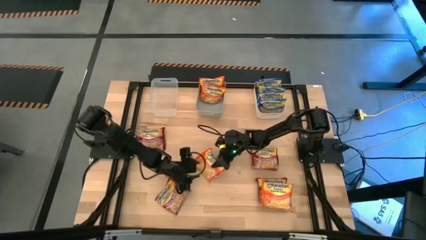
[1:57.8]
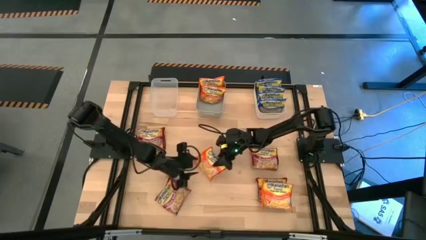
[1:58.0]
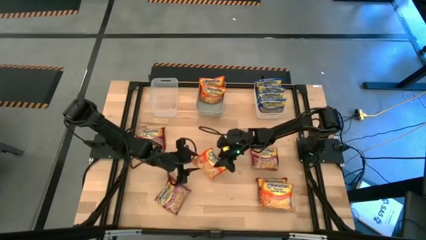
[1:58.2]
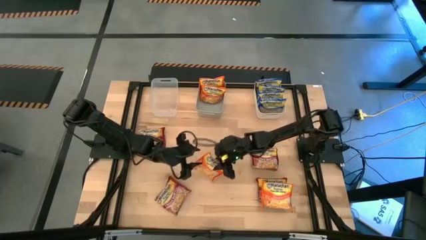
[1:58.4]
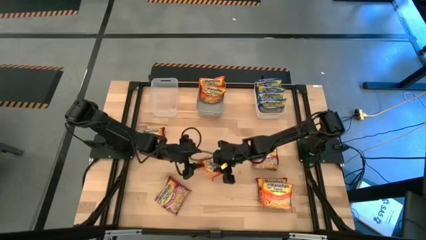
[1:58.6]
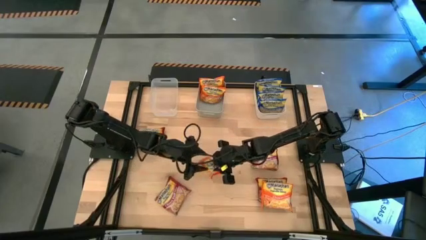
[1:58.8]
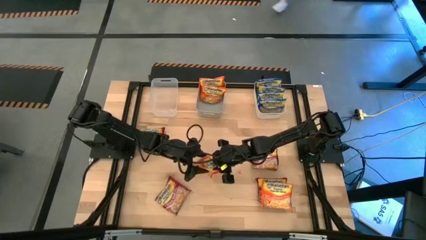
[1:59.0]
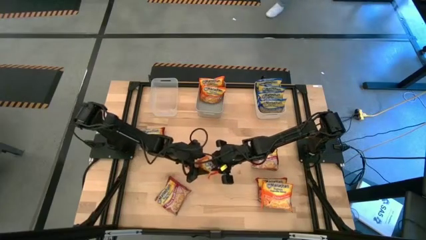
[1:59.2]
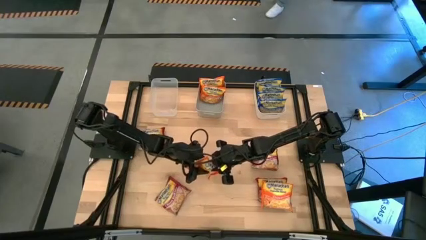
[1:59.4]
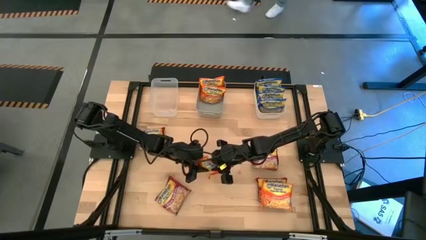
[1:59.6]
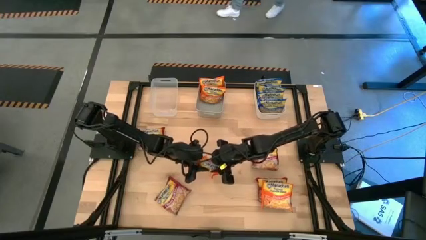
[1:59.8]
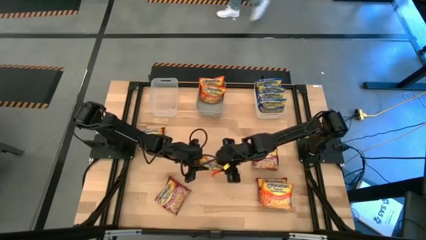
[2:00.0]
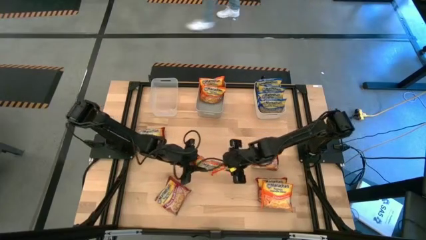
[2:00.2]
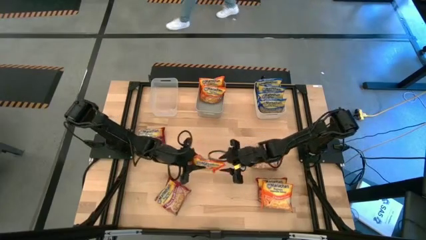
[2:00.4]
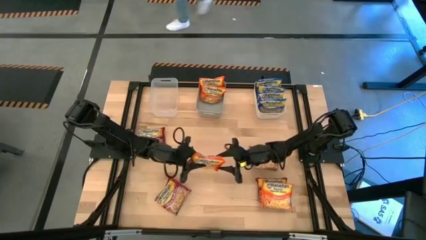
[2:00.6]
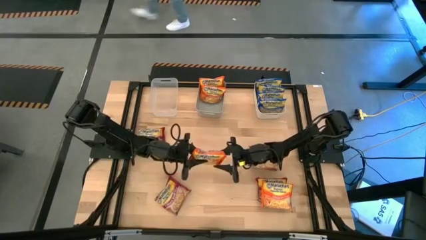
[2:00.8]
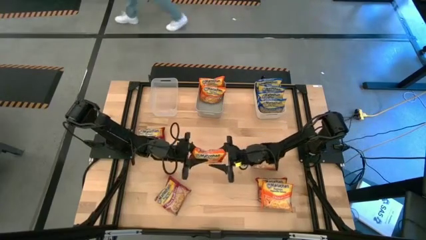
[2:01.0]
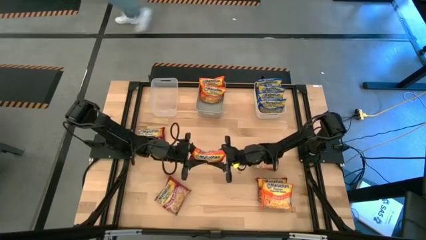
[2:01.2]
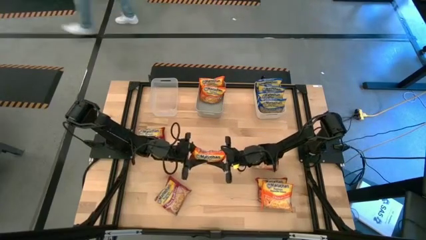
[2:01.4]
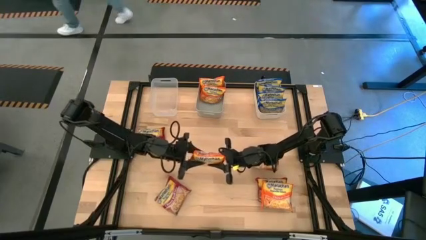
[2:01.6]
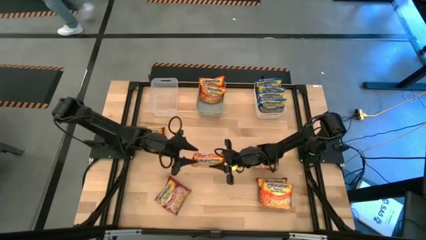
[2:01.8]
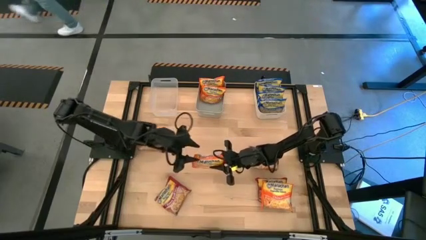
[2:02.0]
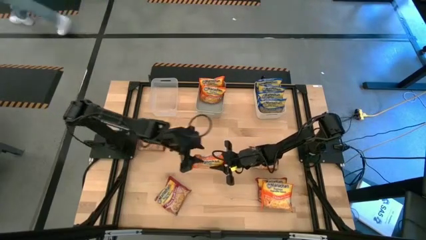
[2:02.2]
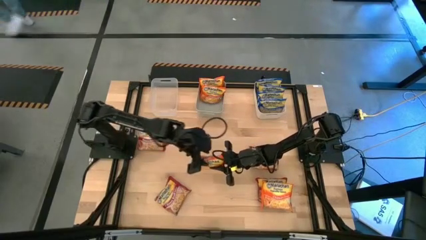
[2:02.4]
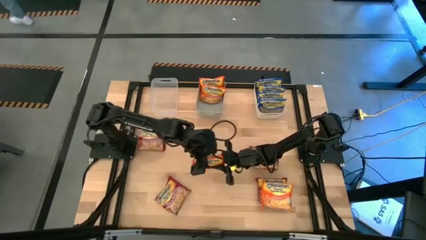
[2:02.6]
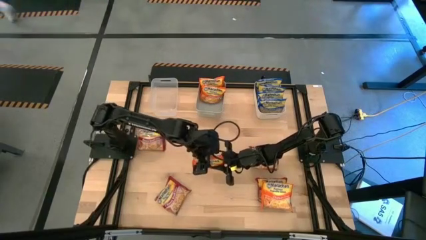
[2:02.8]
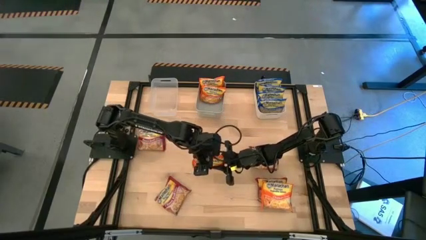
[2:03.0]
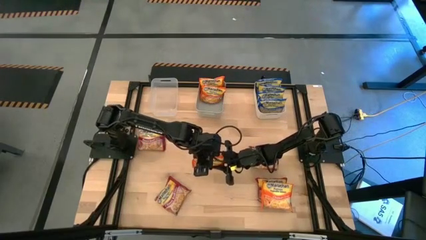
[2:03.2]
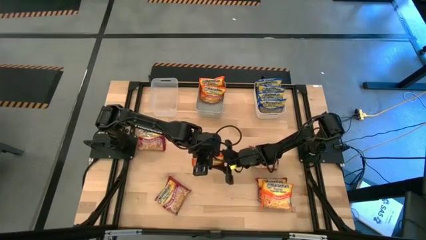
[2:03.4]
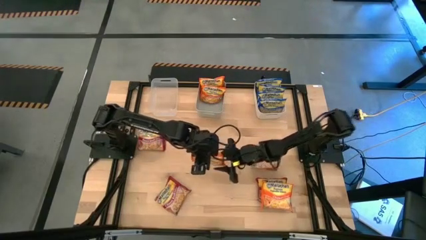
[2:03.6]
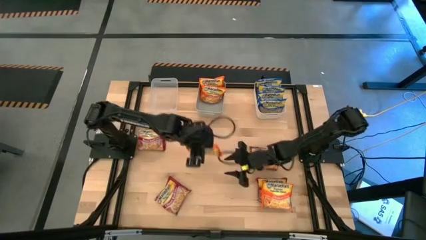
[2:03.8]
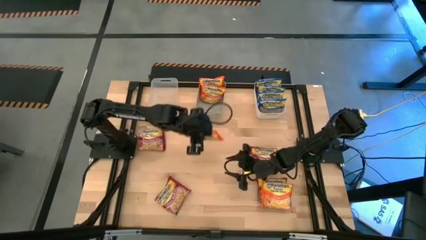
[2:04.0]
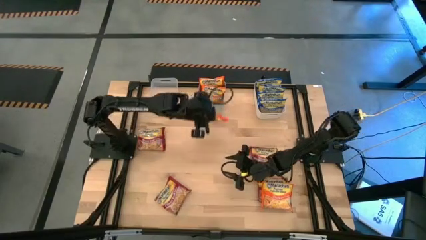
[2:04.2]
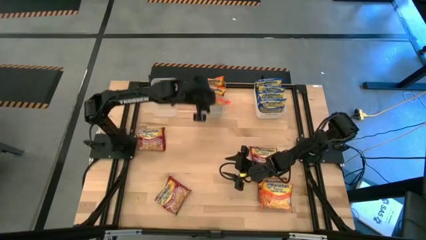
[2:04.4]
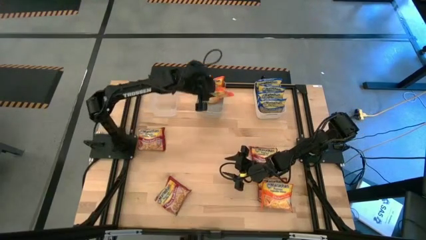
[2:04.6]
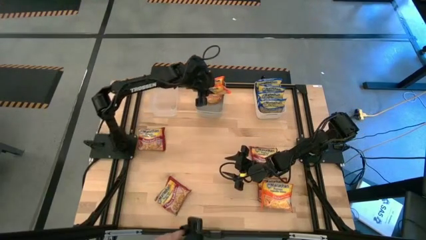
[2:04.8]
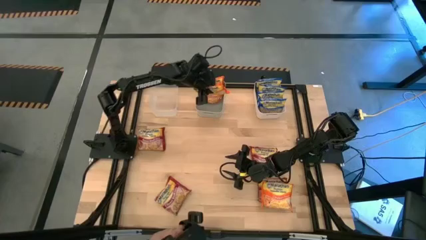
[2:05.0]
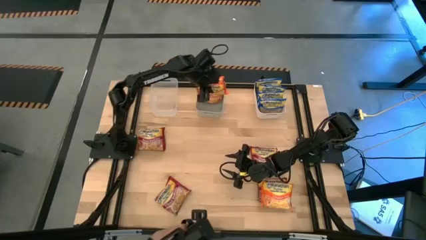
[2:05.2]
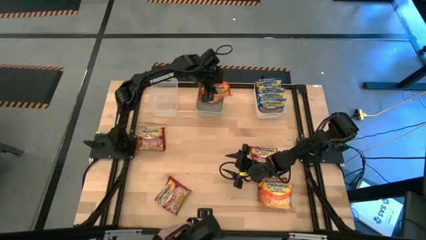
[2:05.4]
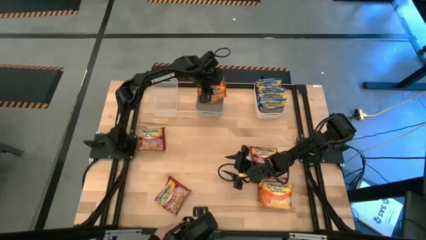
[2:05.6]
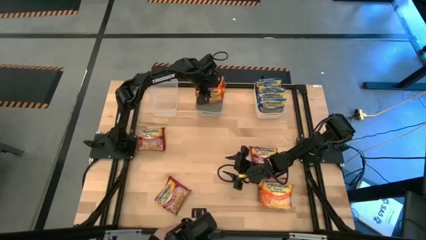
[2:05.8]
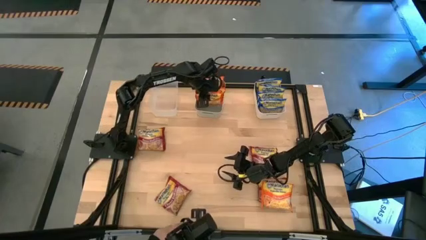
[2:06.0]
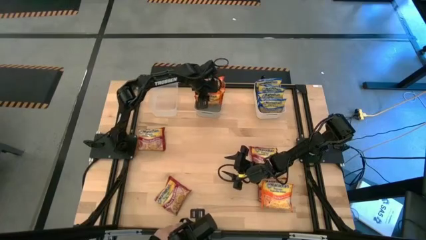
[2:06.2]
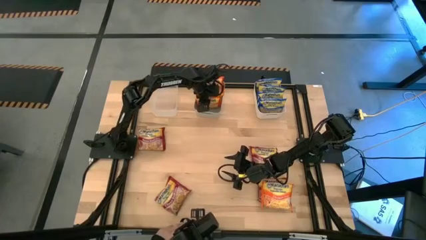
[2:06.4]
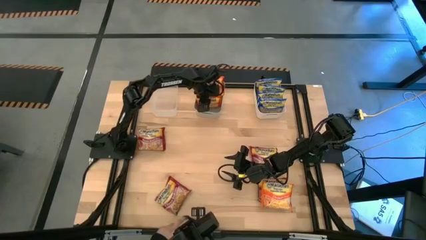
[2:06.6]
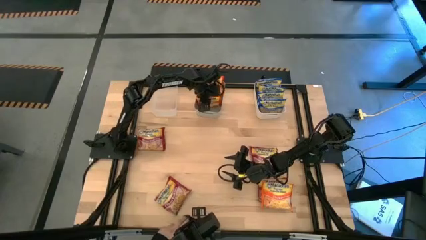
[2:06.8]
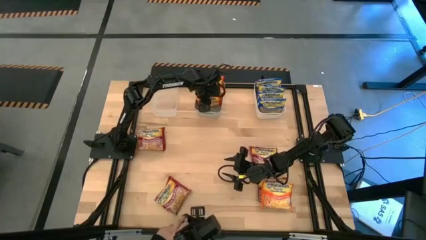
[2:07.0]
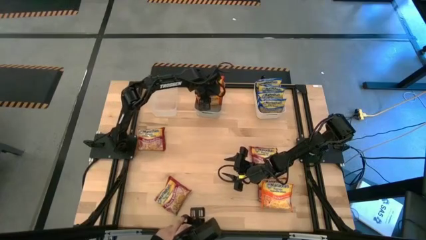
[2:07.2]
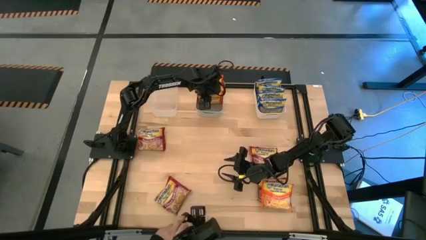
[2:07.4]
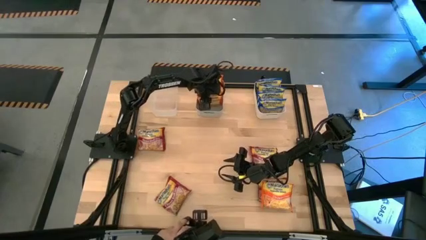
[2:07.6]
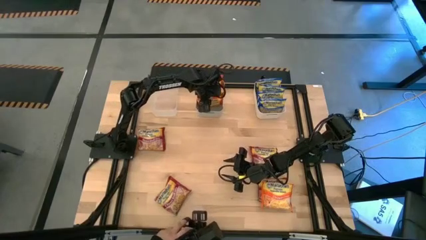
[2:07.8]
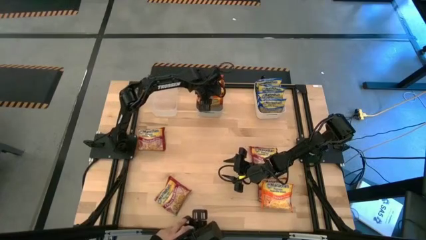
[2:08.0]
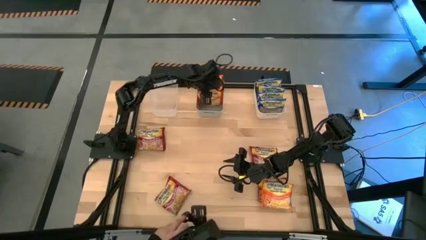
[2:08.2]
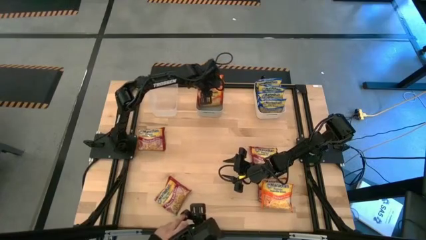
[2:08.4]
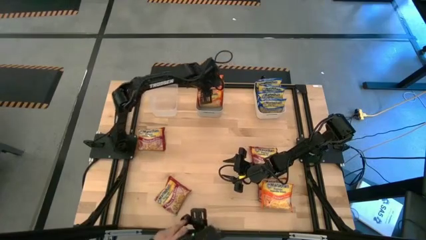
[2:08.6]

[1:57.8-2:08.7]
Task: Sort Maruchan noodles
Put the orange noodle pack into the gray bin

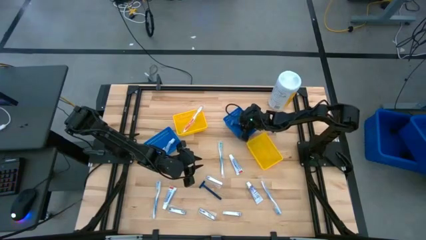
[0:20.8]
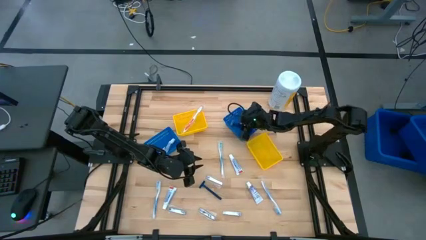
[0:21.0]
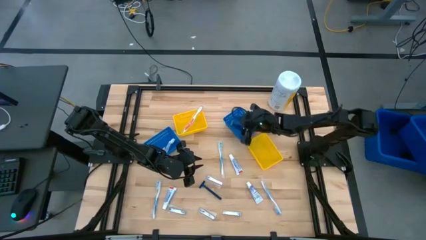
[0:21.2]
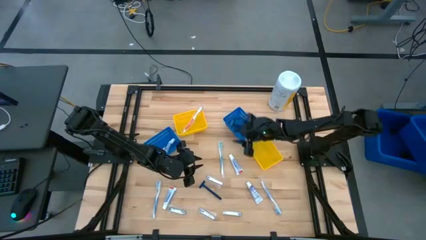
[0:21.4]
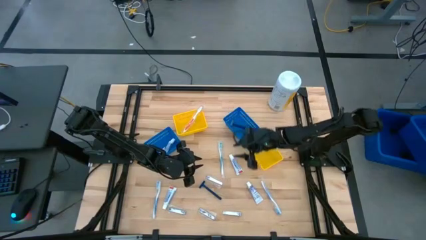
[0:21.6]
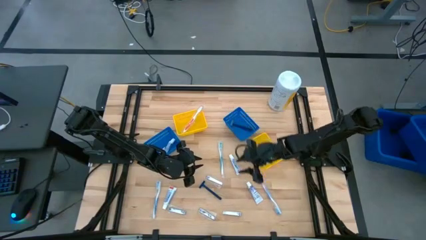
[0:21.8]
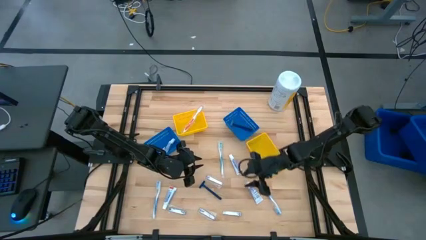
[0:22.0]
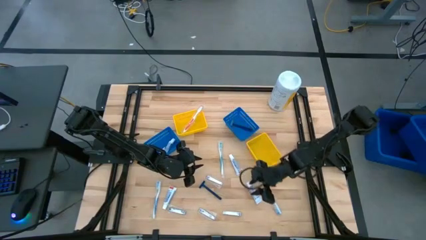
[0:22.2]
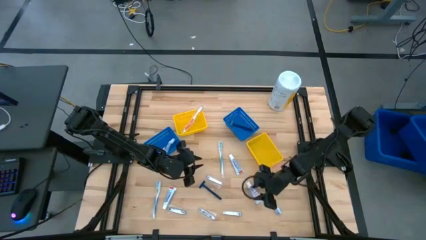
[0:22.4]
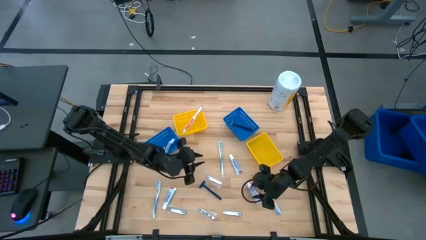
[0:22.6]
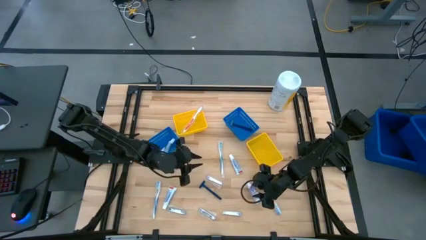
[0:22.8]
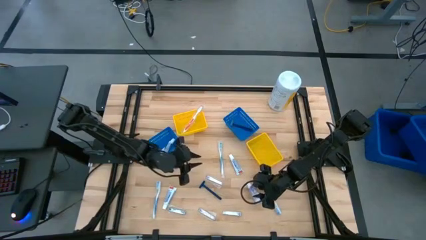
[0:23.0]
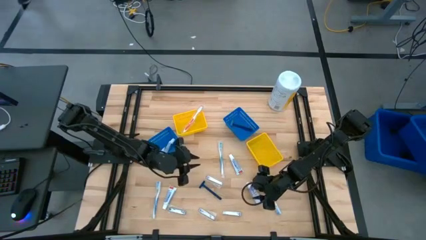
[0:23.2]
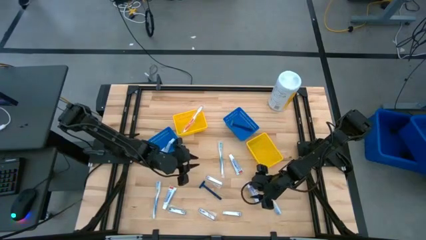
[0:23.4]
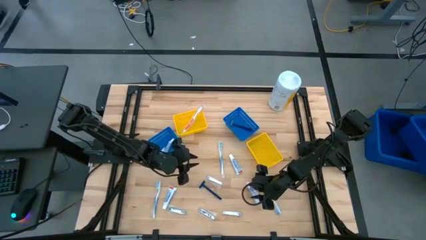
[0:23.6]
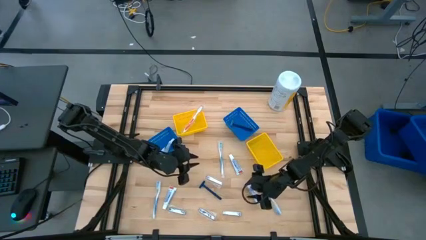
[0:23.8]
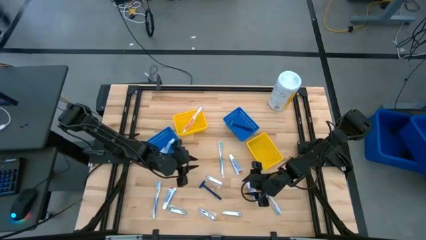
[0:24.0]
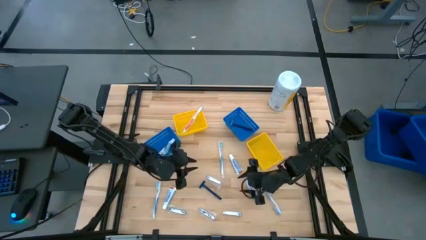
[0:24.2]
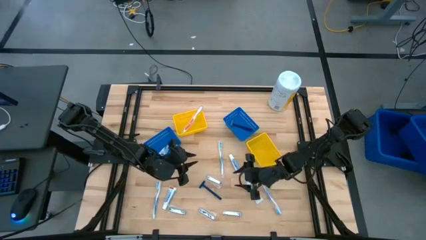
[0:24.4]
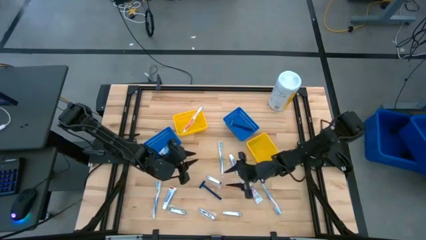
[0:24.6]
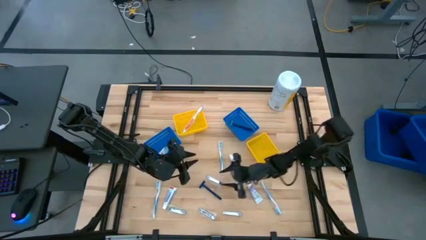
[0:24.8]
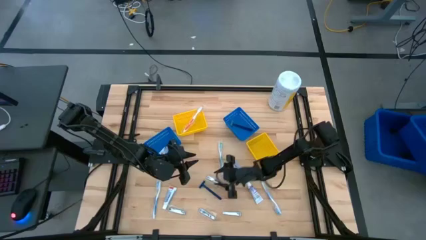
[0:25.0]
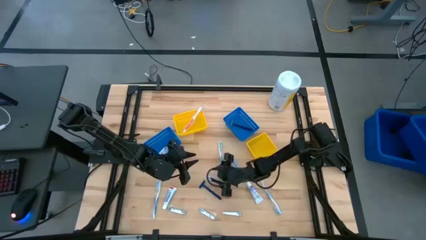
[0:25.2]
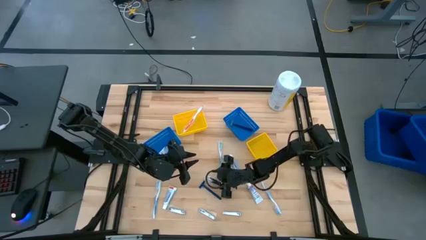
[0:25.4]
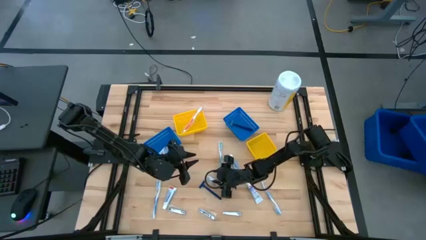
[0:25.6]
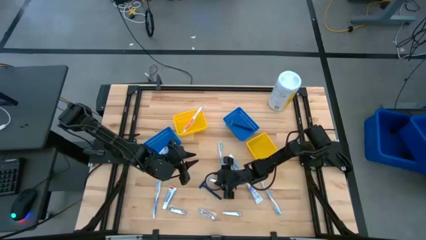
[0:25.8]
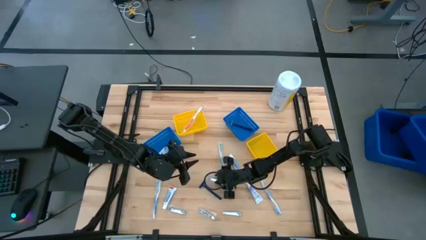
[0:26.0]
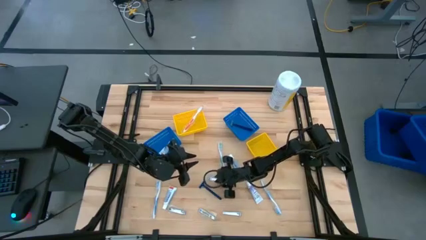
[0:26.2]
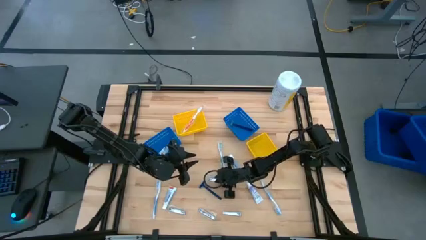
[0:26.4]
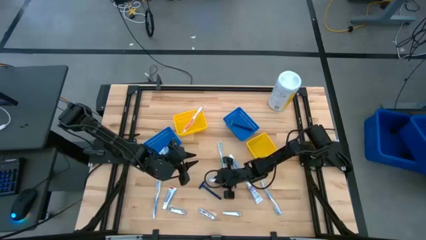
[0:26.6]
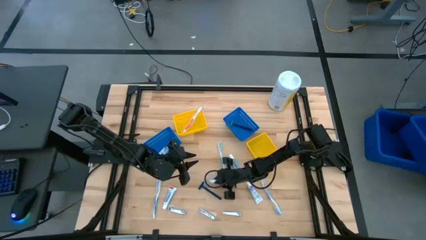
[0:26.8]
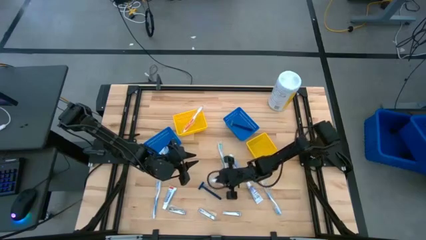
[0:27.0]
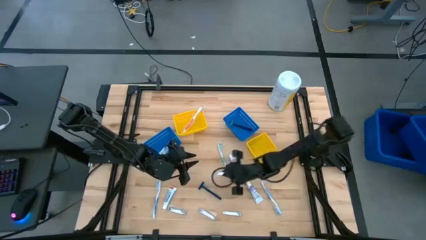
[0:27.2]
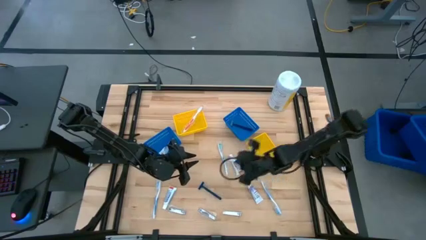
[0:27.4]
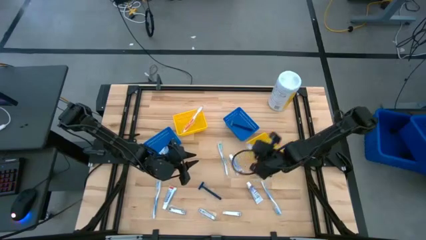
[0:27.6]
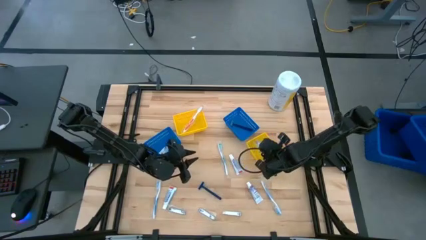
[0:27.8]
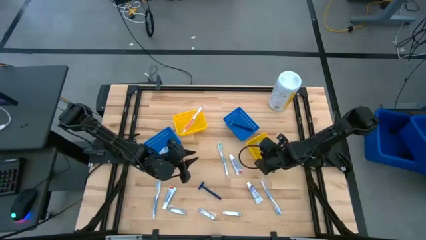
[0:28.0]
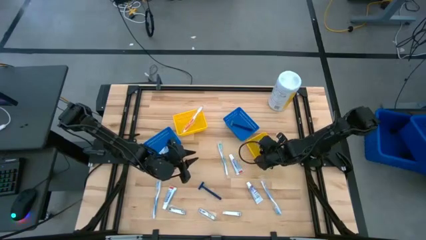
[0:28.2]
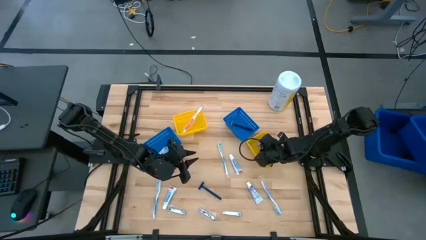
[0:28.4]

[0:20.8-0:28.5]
Task: Pick & Place Travel size toiletries
Put the nail cutter into the right yellow bin
